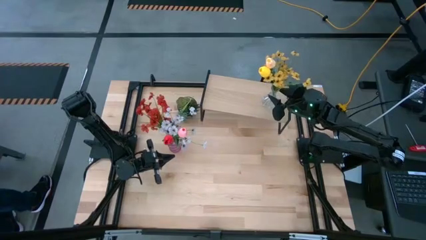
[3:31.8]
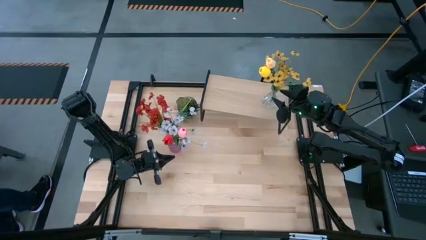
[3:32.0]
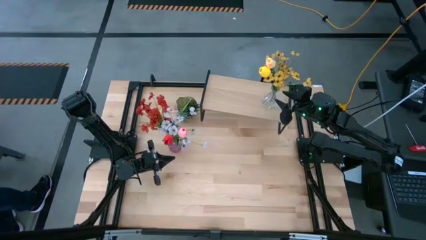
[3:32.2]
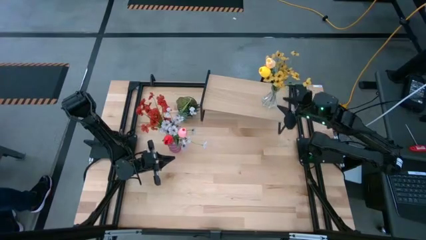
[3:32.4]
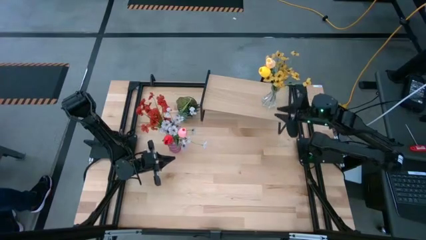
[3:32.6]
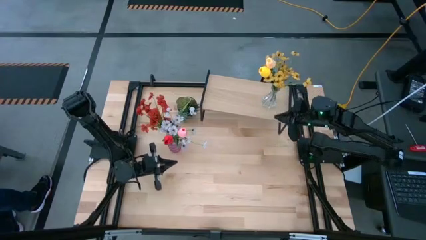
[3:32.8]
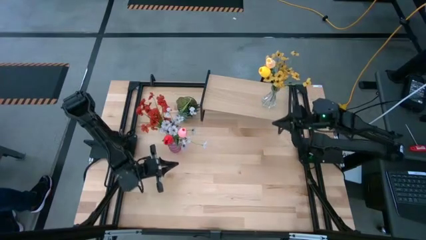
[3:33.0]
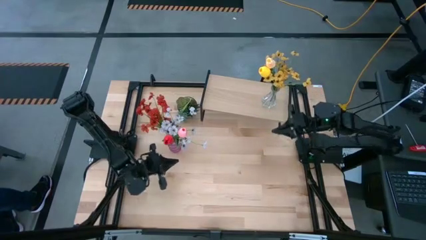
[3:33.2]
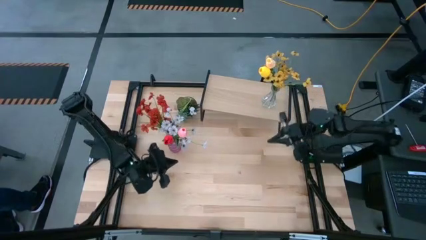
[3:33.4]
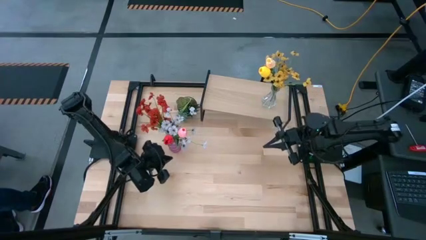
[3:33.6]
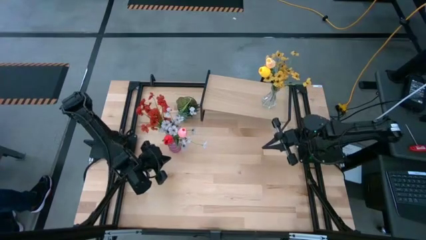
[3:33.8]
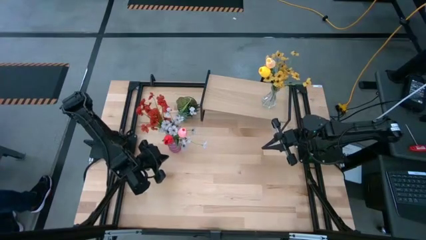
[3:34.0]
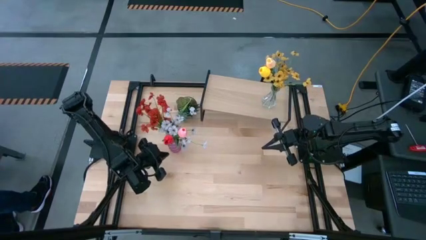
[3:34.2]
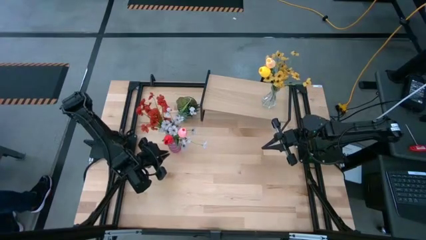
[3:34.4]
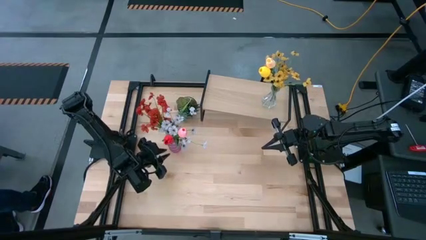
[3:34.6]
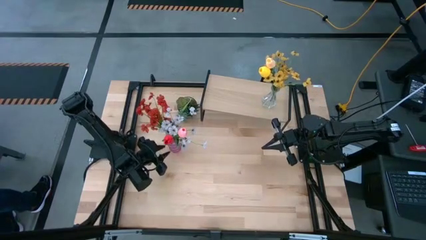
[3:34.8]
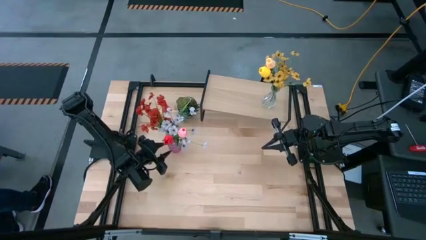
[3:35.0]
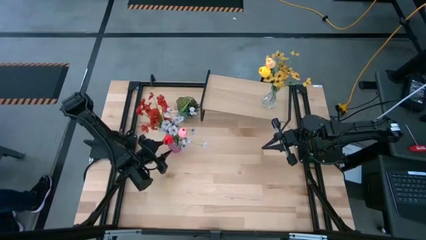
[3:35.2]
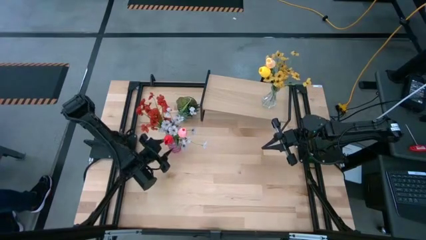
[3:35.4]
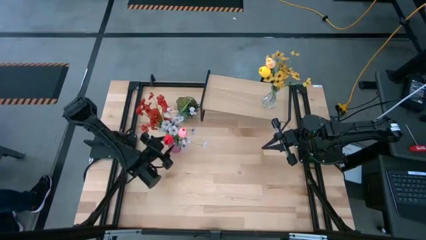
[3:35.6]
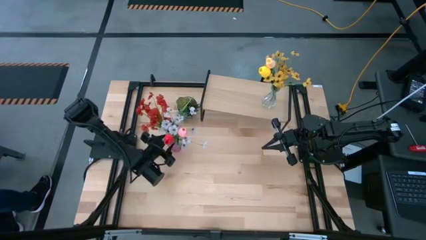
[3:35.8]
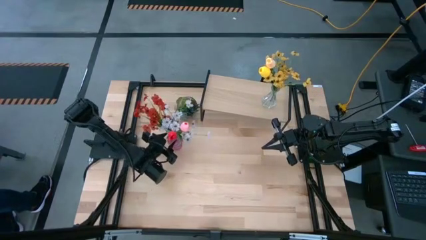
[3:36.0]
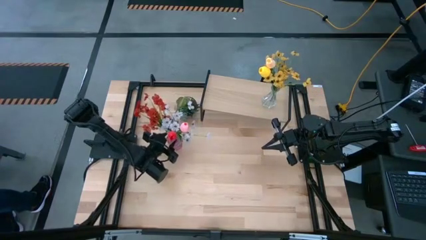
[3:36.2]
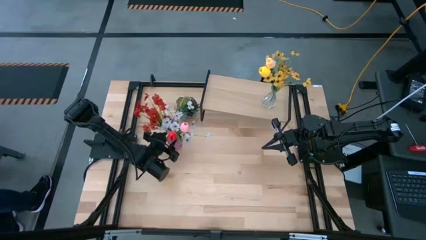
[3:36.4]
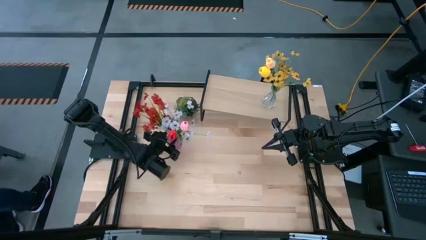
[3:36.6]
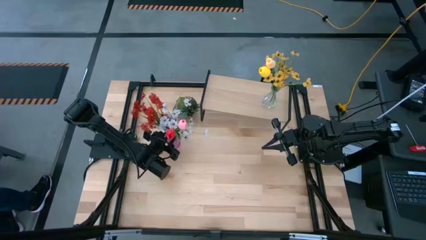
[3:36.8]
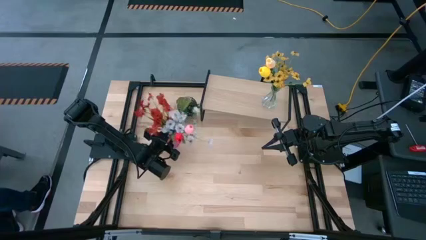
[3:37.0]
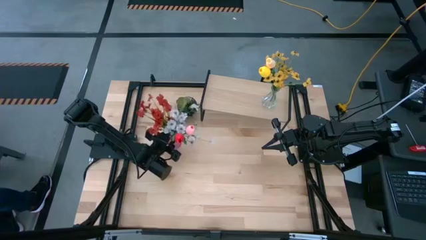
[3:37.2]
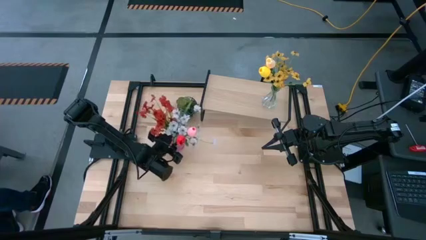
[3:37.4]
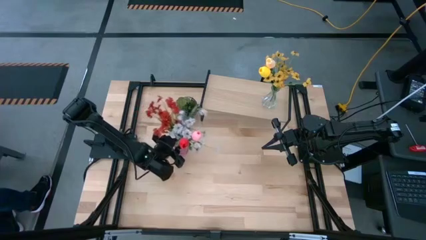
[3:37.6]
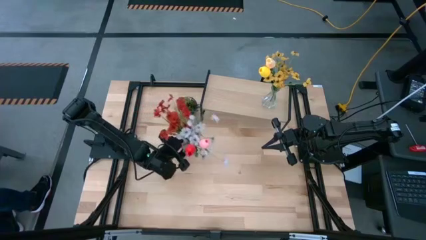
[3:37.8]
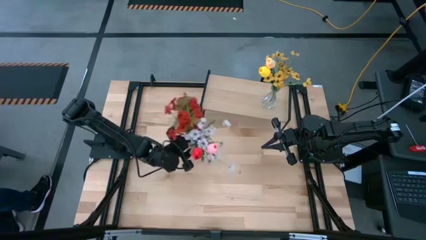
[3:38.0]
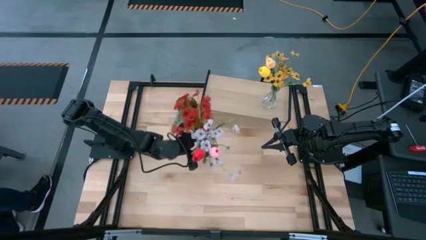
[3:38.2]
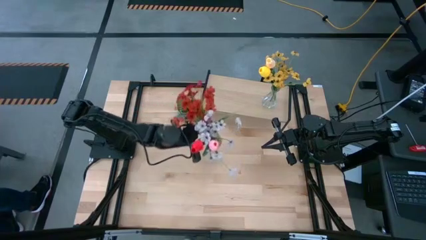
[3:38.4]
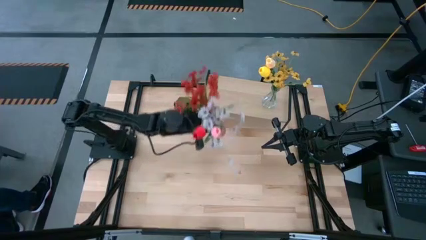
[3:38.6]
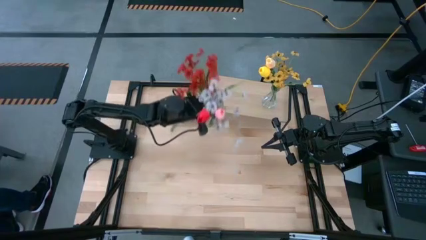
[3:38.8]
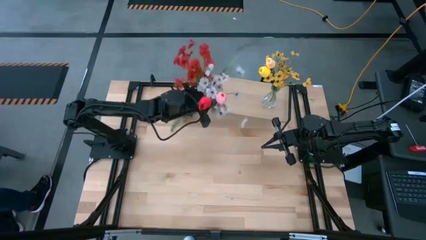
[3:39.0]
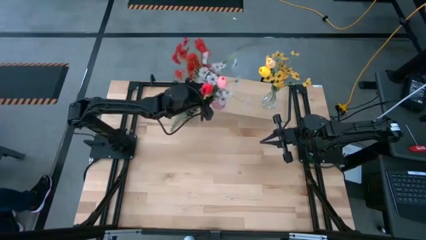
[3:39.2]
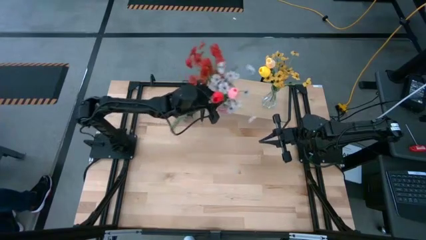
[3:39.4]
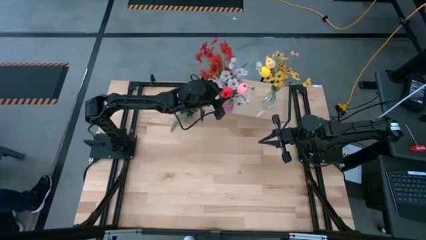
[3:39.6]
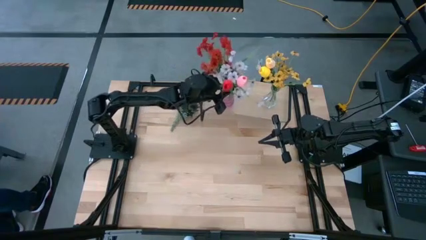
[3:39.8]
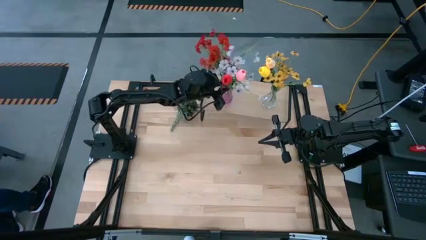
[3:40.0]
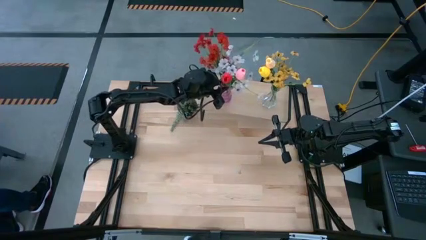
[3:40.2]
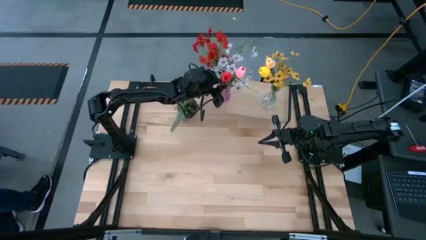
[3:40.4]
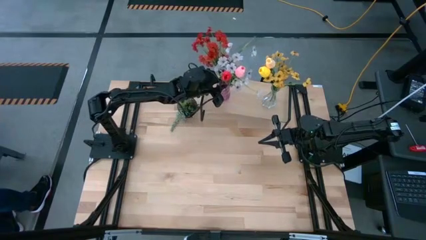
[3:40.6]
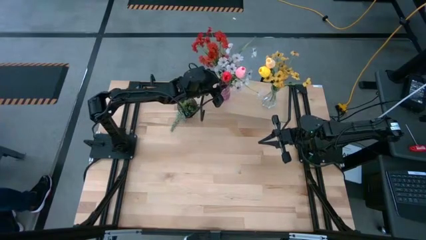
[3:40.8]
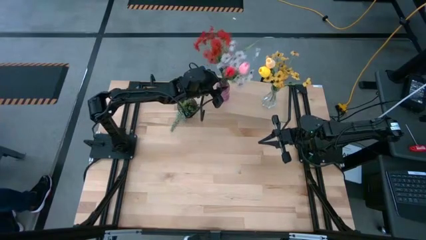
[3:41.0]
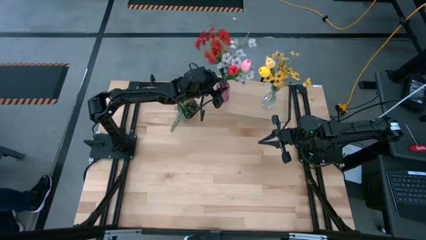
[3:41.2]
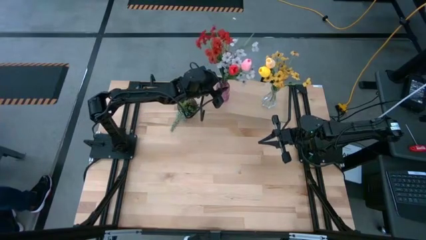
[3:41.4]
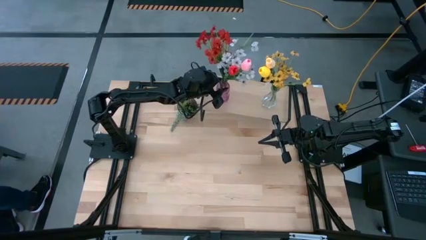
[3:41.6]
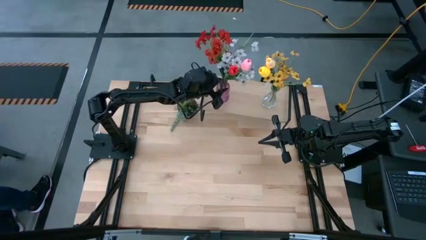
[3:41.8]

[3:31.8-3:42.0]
Task: Pick and place flowers into a vace then onto a shelf
Put the violet vase with flowers on the shelf

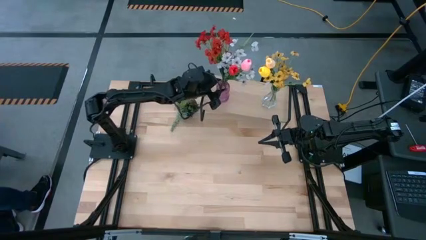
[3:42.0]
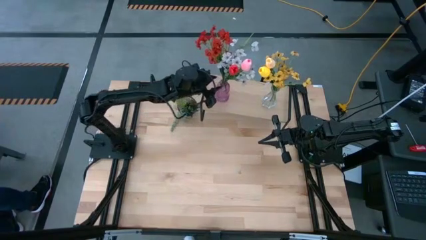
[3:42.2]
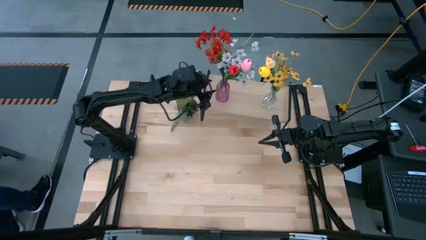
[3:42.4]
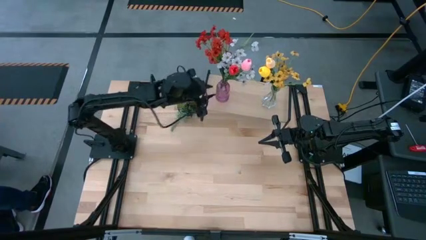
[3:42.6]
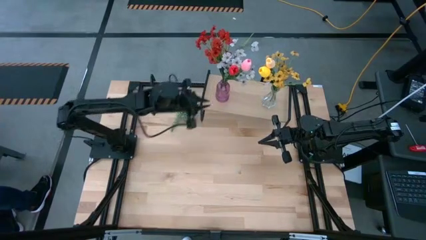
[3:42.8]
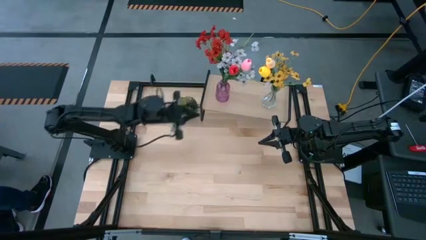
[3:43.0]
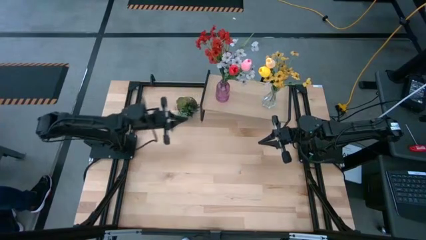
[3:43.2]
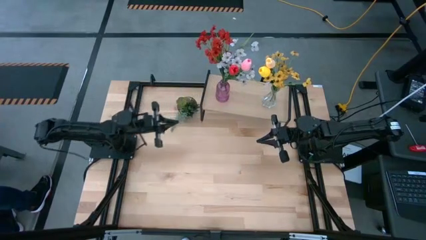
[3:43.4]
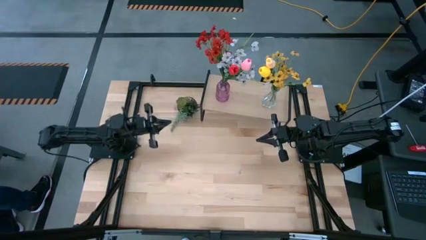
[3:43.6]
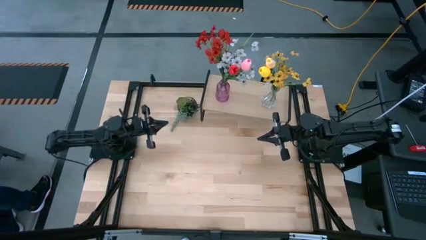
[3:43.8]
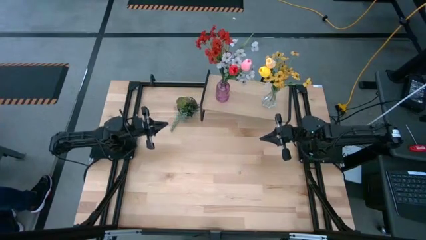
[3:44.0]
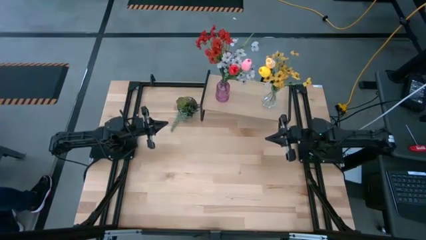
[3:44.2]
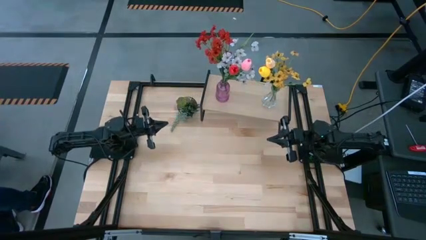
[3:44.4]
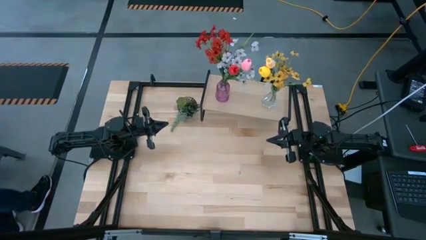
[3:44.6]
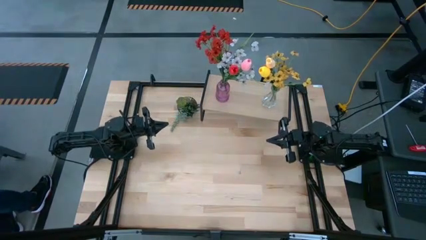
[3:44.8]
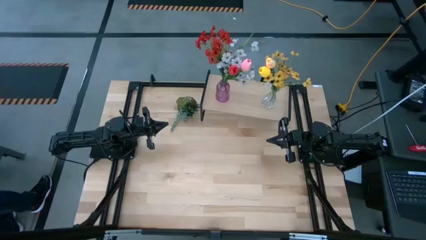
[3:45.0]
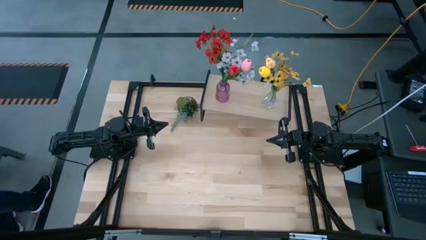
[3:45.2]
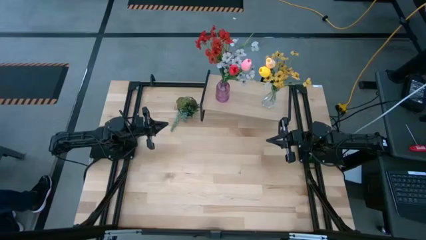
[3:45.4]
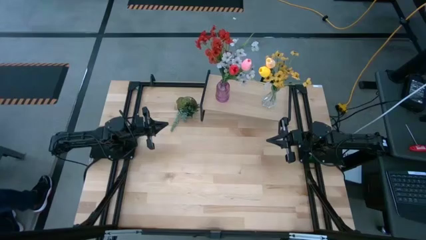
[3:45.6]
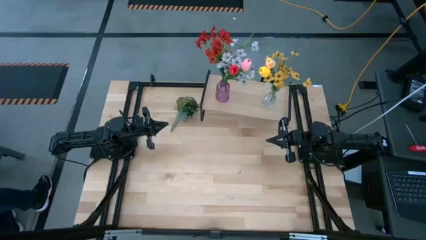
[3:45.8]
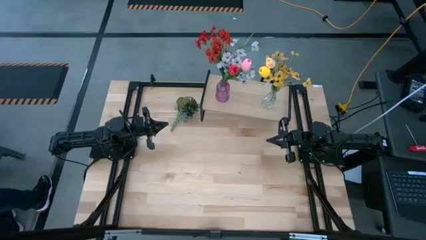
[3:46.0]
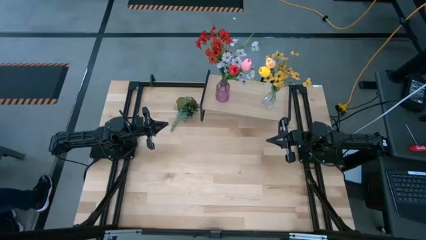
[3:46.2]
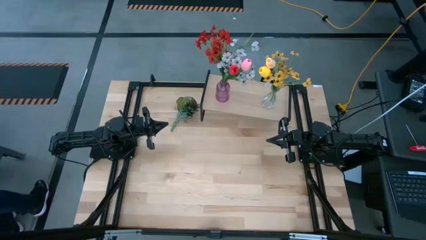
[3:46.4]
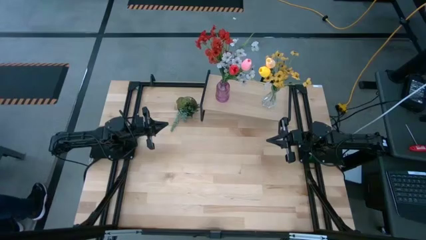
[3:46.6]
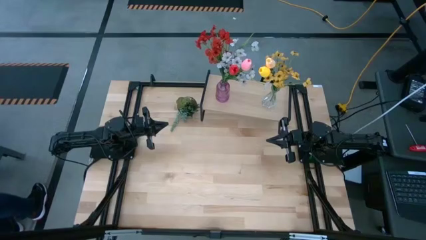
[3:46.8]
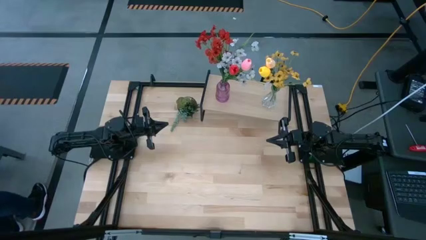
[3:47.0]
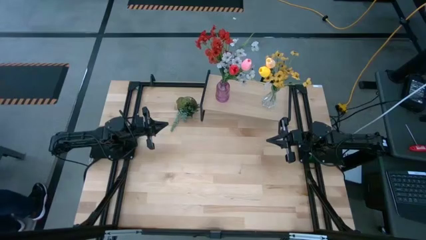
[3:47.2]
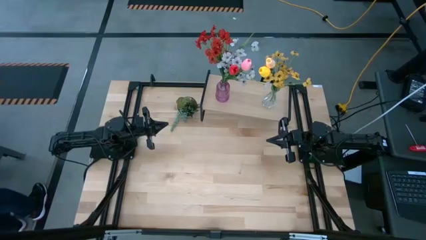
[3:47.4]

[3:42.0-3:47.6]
Return to Home Position

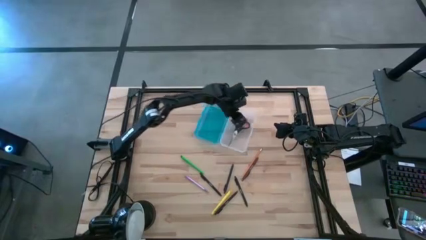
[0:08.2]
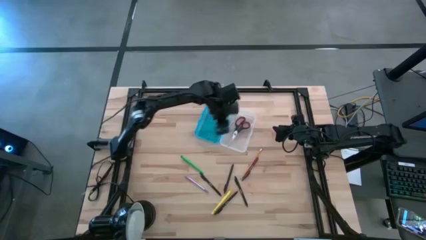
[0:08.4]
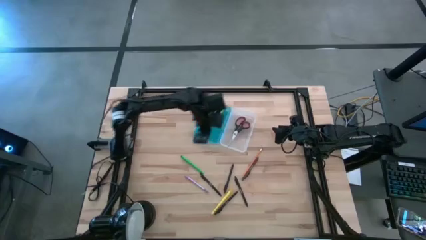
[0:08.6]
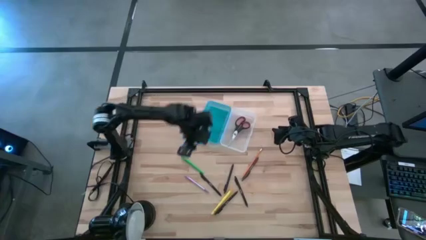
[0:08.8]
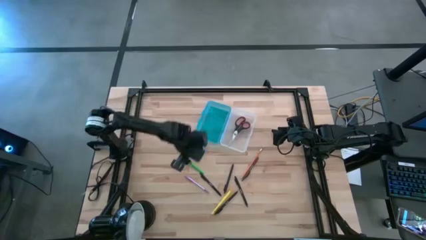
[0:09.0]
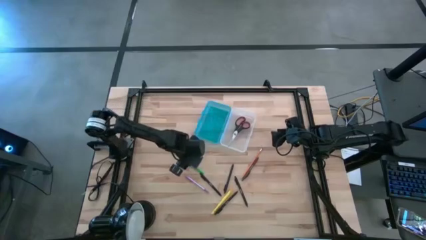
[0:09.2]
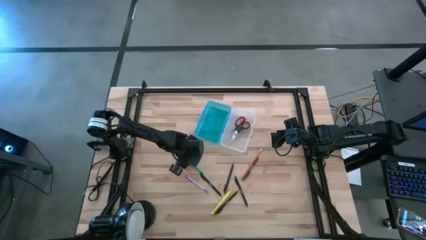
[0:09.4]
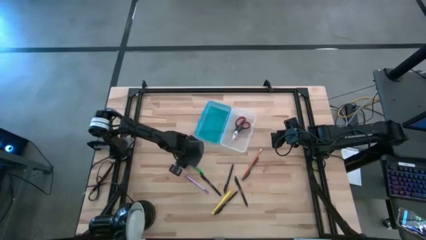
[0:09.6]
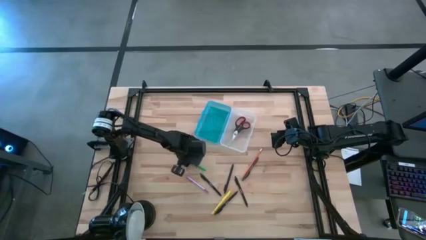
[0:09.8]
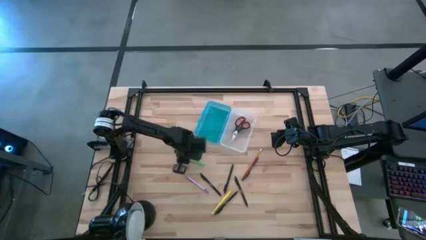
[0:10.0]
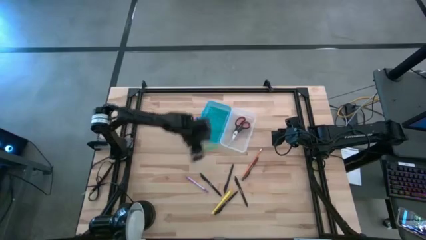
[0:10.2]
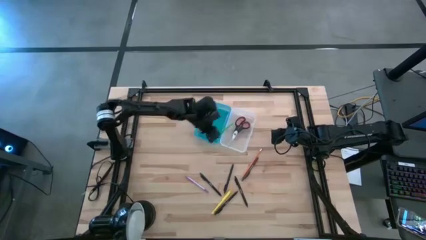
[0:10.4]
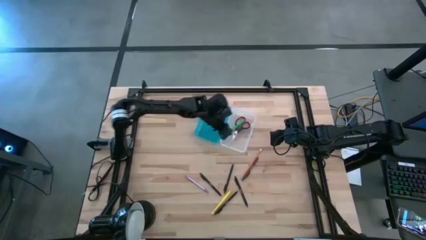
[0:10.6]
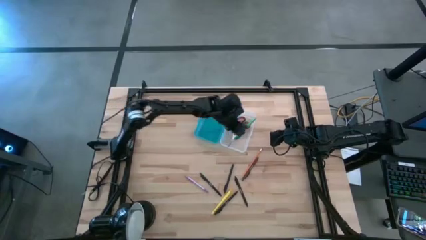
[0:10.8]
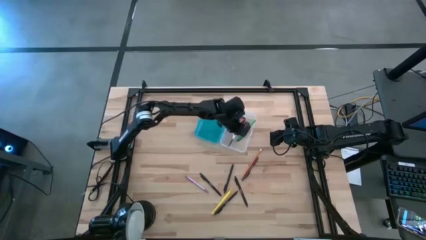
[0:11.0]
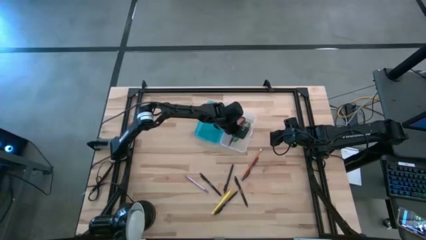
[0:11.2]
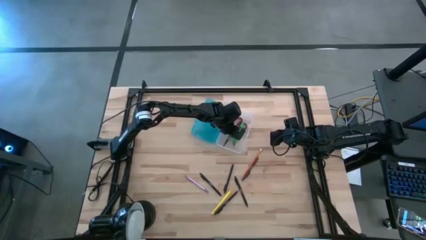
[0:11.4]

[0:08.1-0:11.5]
Task: Pick & place school supplies into a supply box
Put the green pen into the blue supply box
